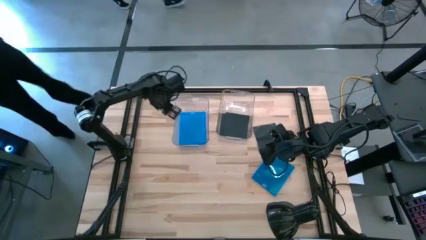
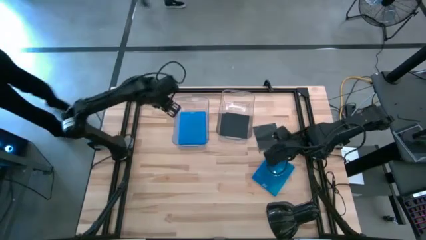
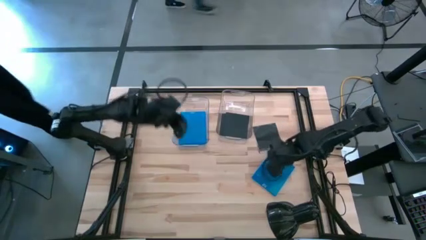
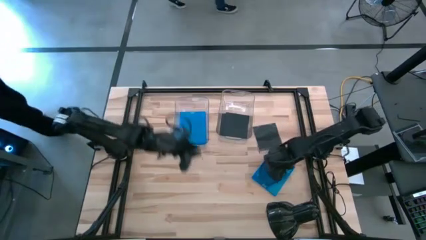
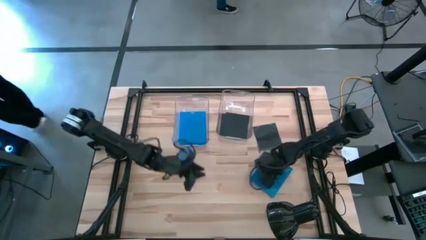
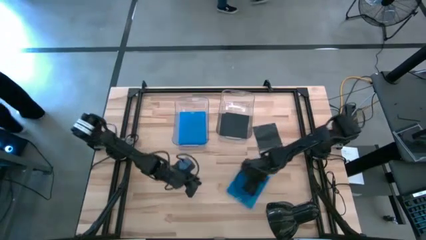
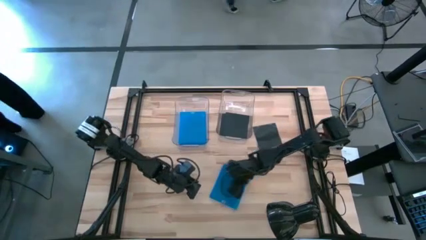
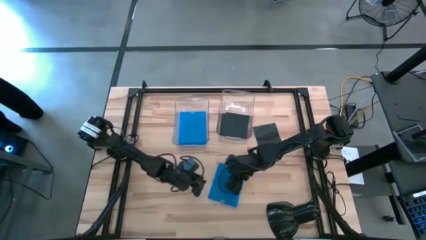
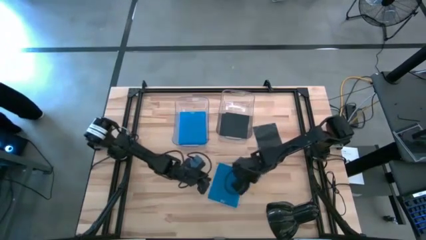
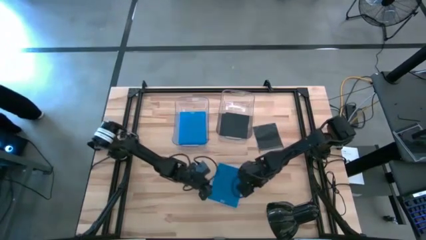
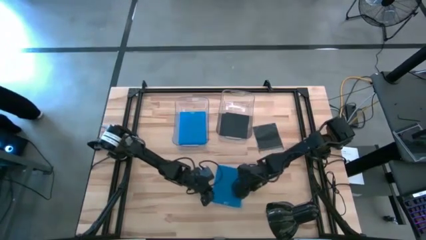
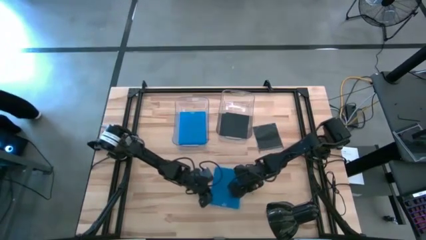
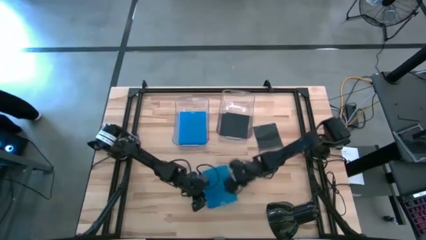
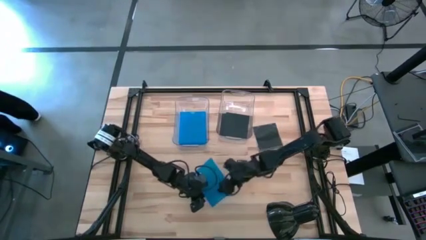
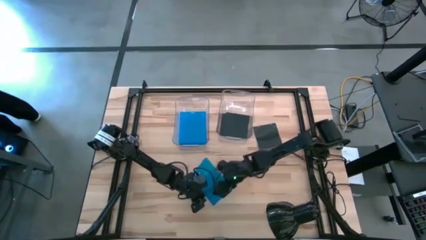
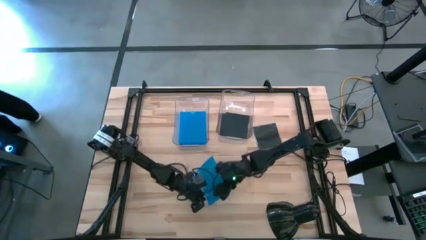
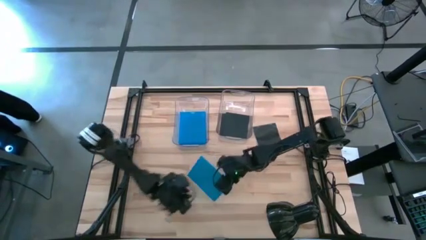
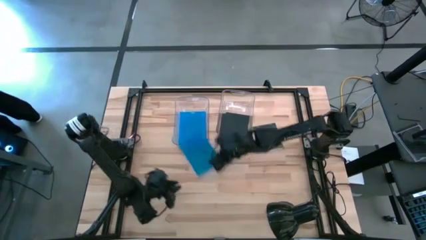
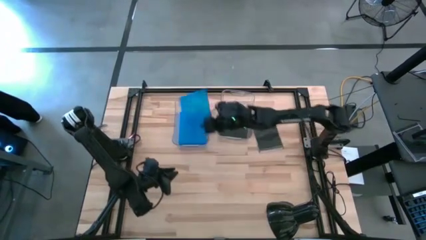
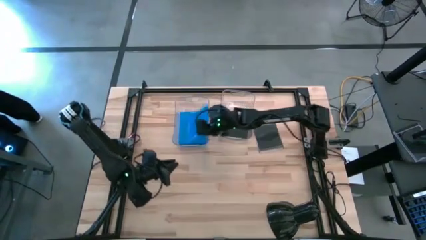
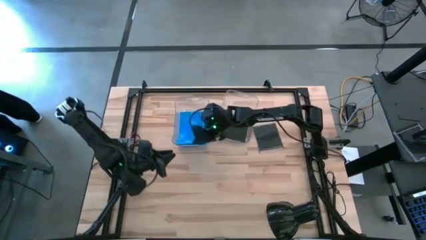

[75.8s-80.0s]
Task: Pick & place jewel cases by type
Put the blue CD case into the right transparent bin

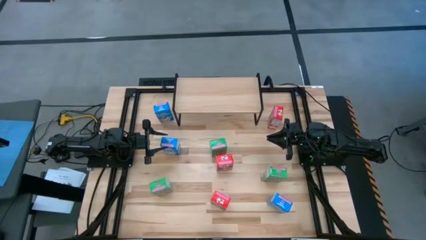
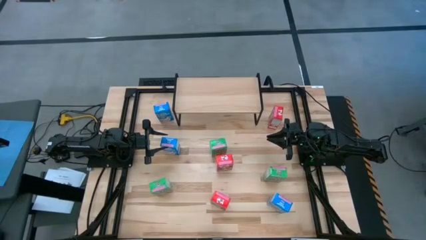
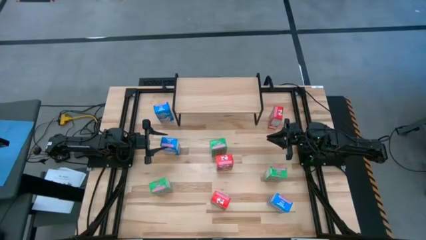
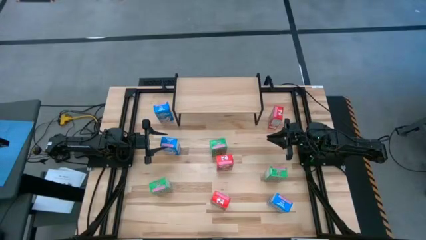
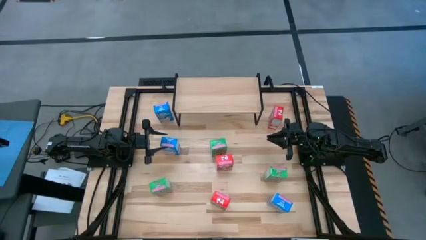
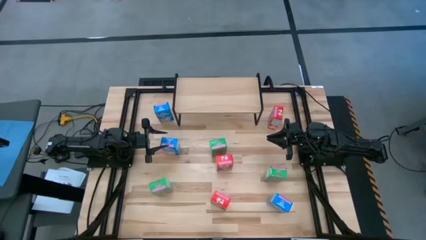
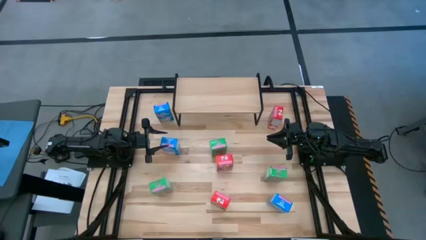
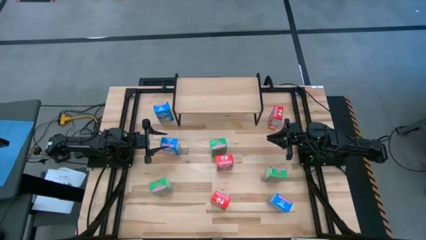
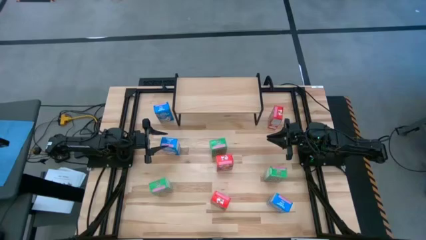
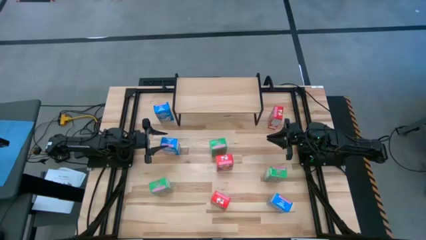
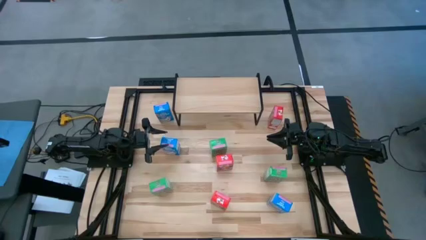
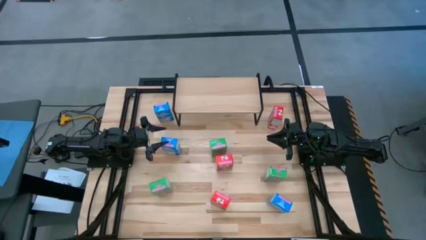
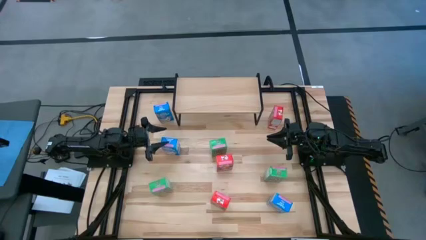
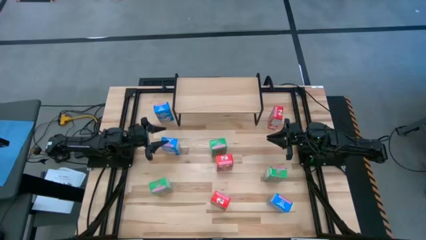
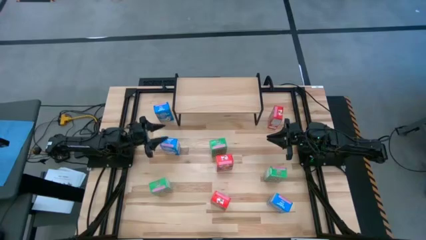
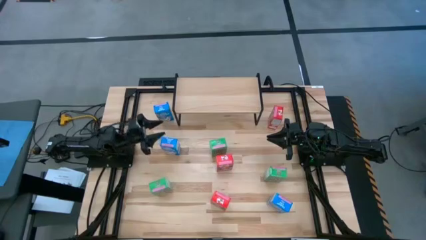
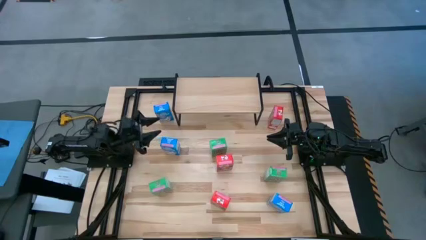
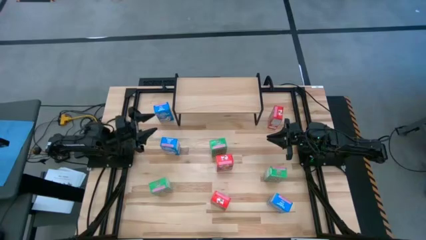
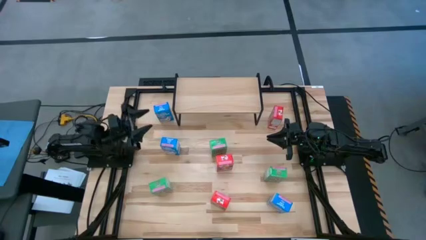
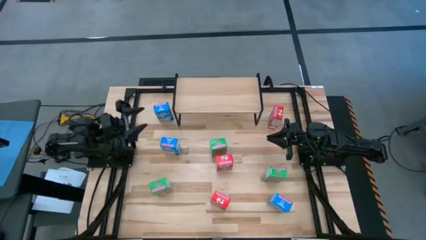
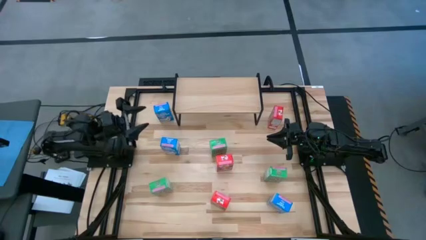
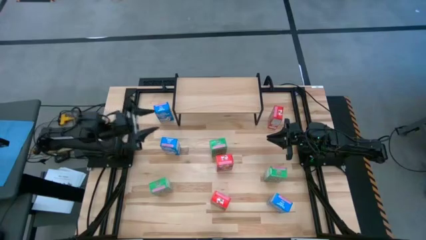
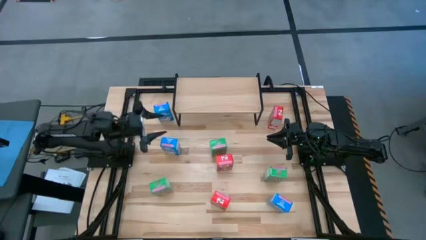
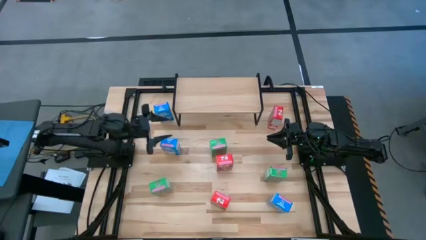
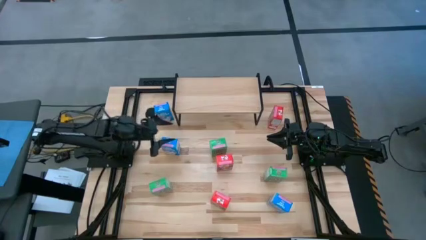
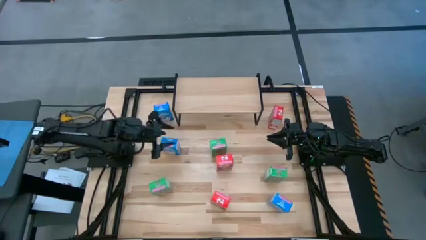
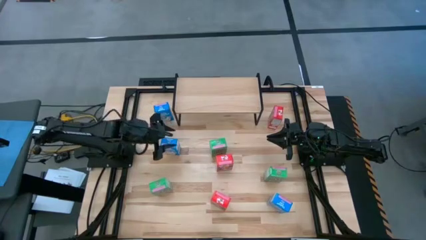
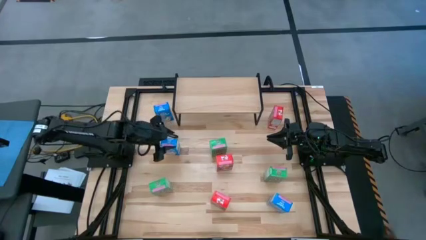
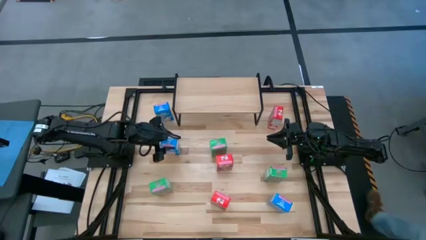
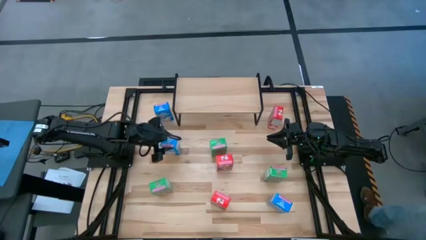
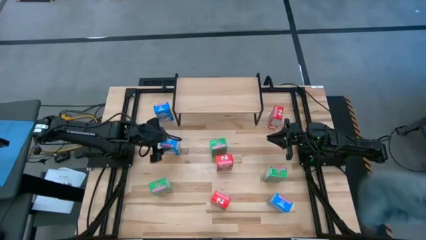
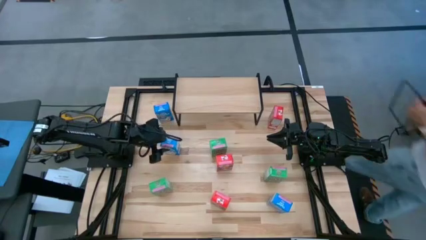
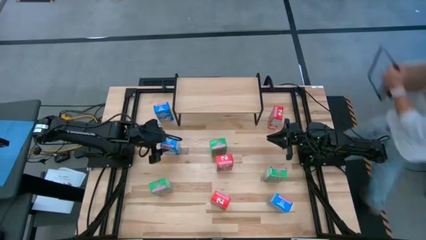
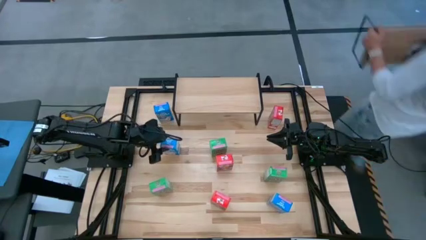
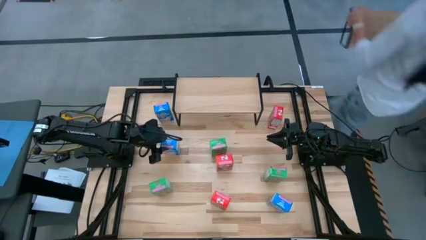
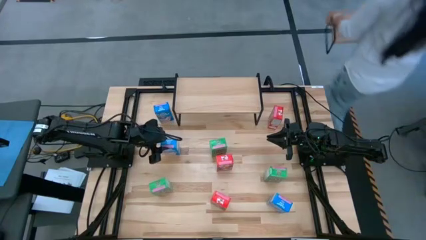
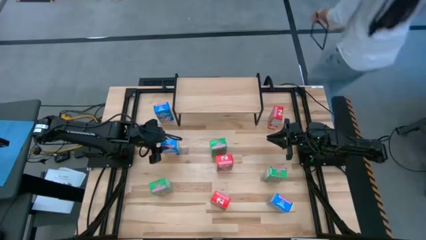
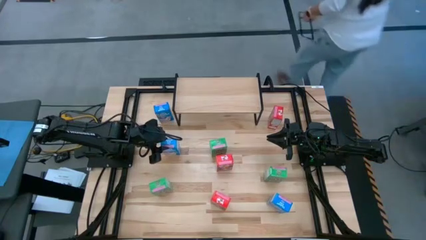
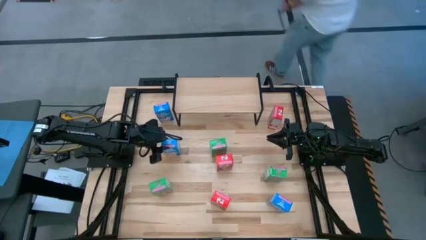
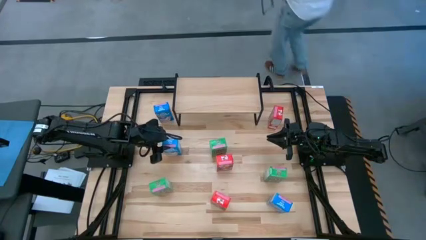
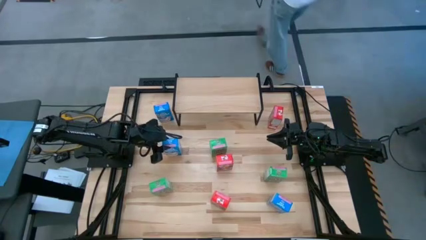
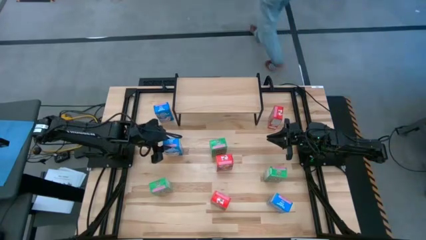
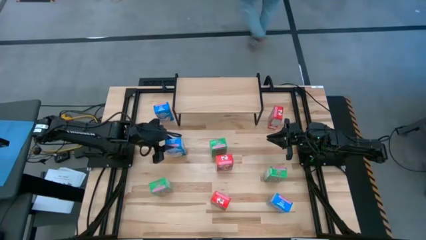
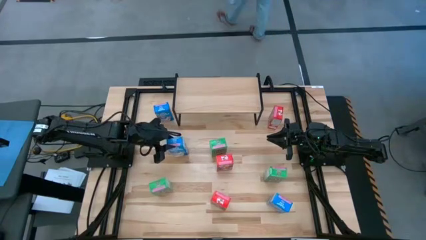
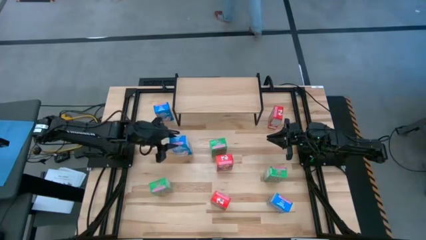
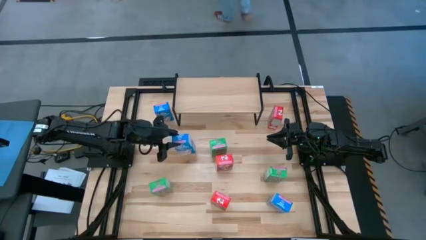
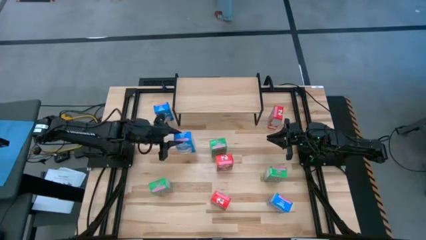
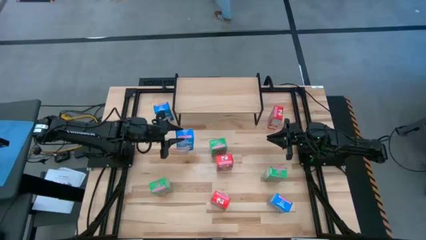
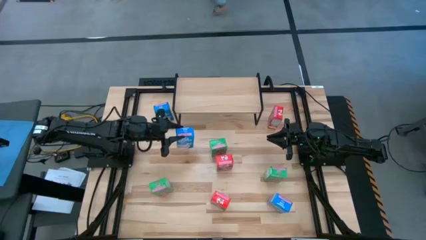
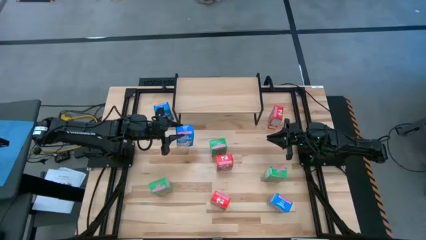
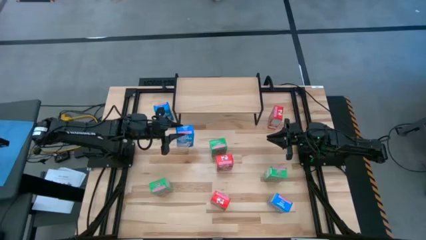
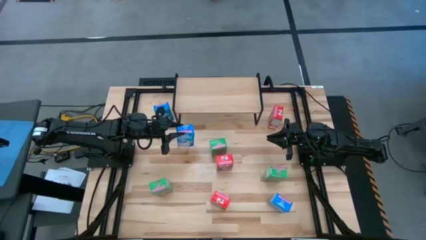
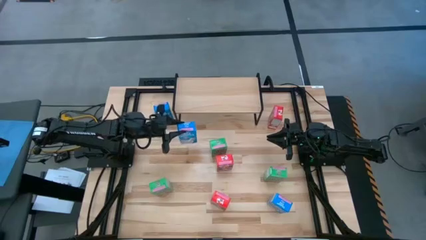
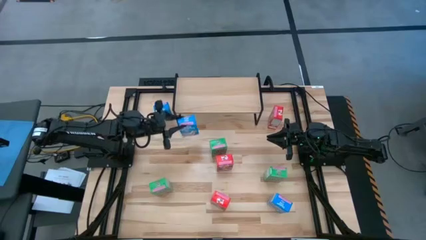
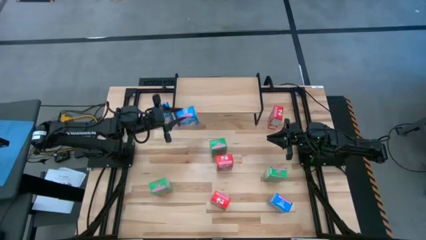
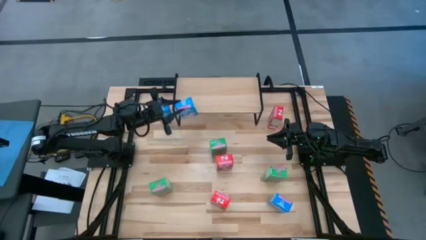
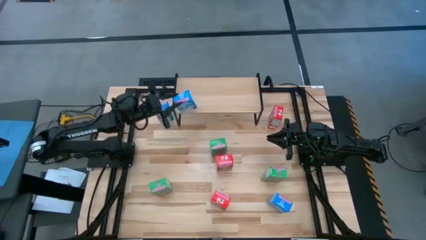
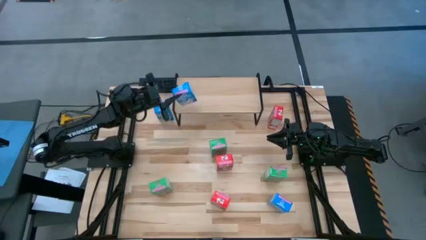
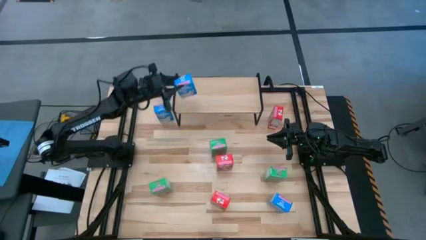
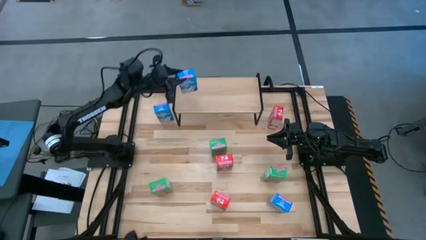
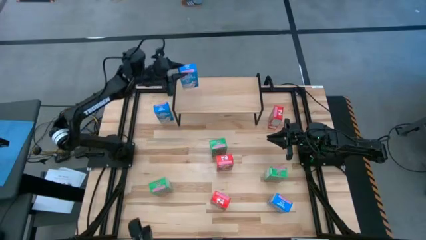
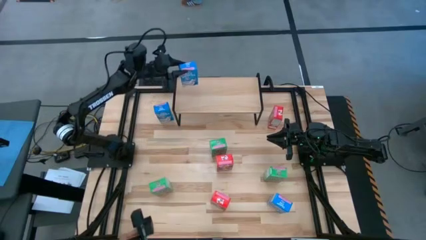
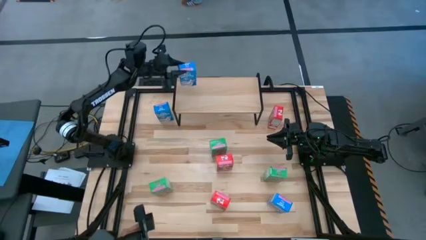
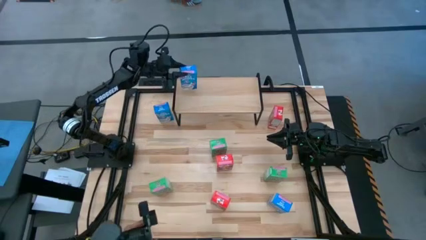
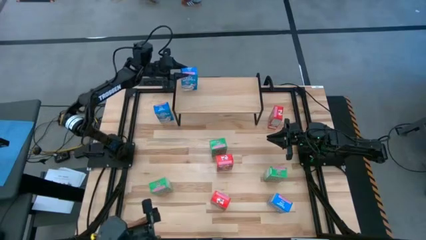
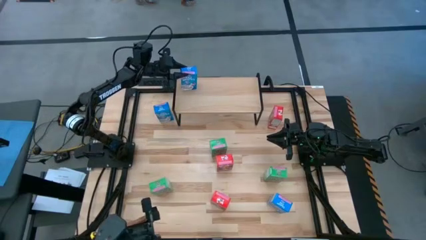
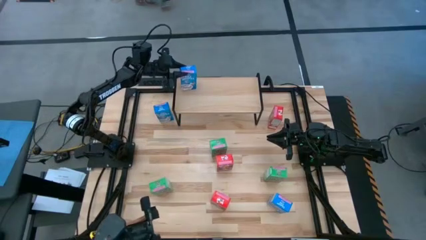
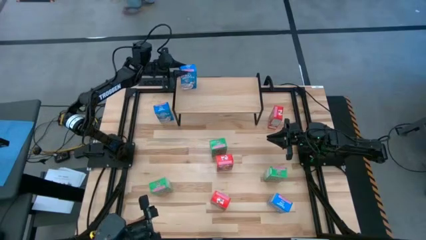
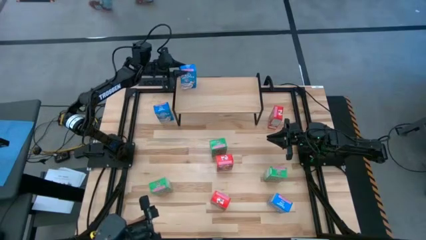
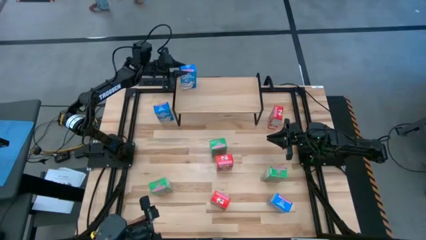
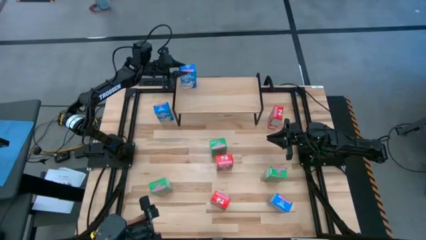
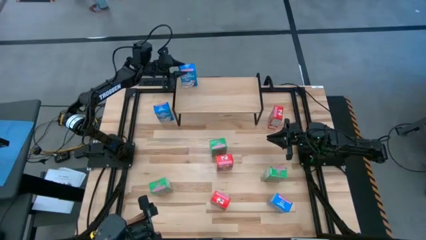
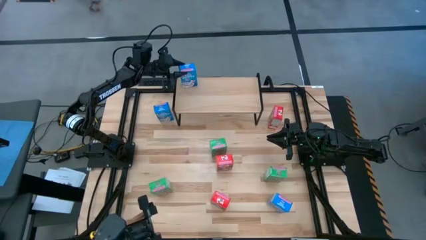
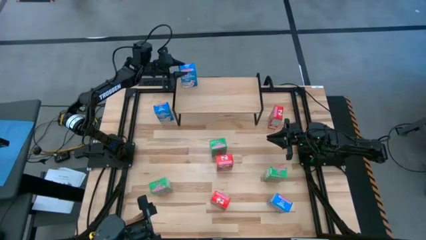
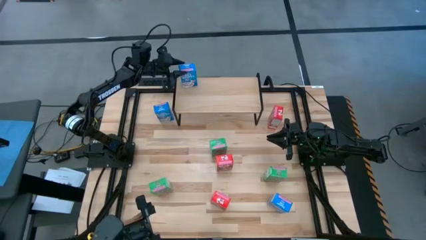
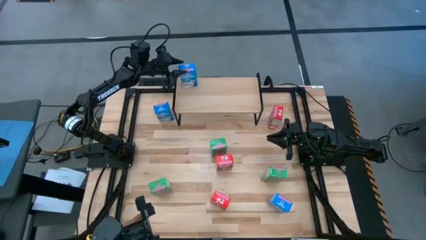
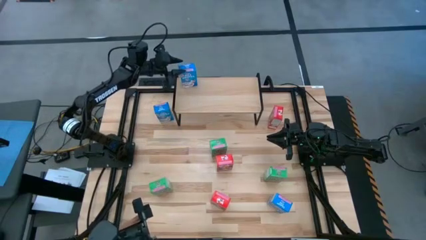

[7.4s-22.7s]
Task: Stack cereal on shelf
Put the middle left blue cereal box on the shelf
